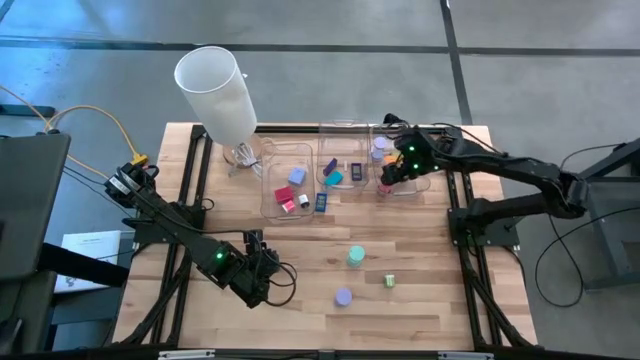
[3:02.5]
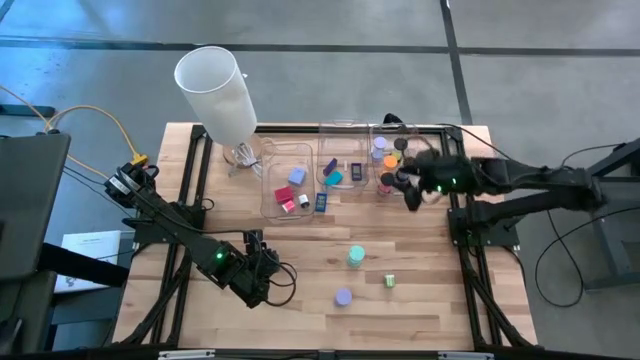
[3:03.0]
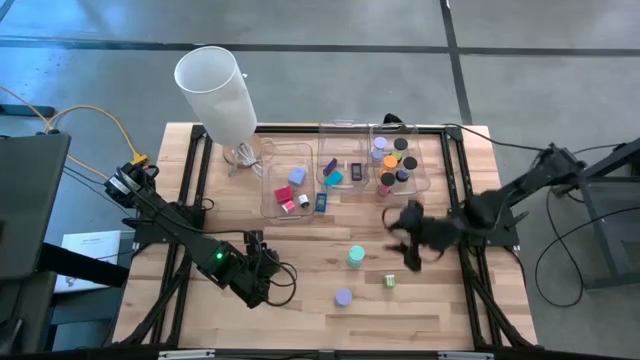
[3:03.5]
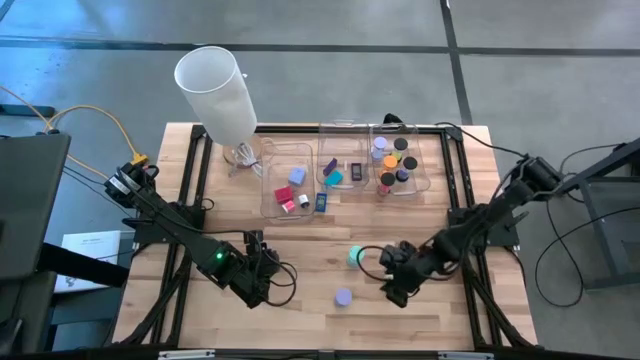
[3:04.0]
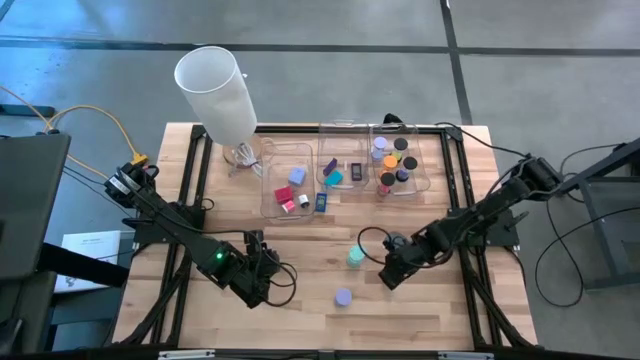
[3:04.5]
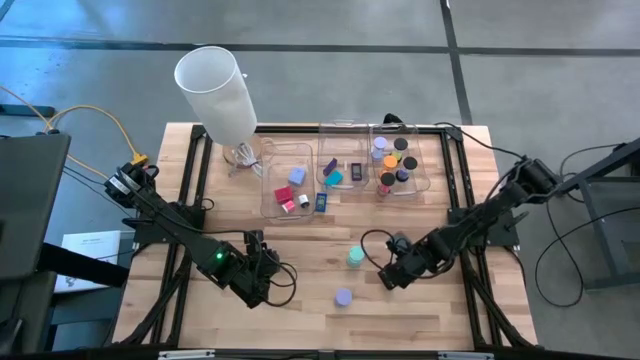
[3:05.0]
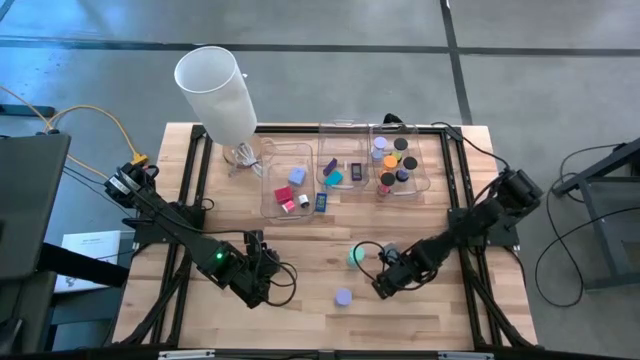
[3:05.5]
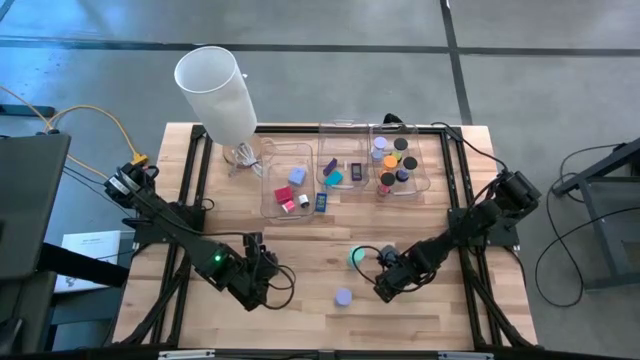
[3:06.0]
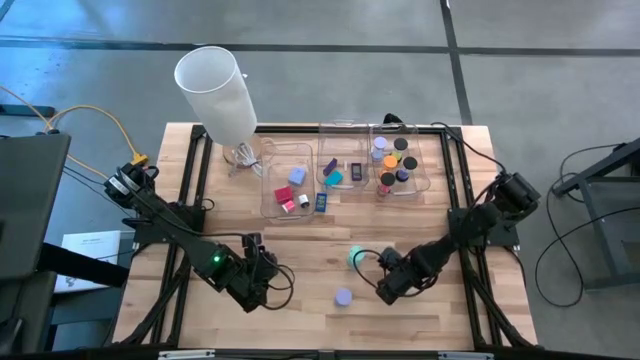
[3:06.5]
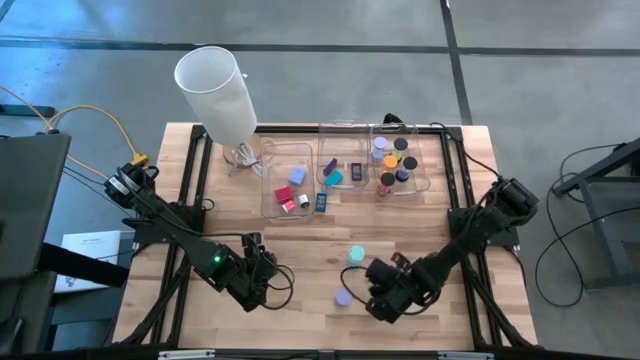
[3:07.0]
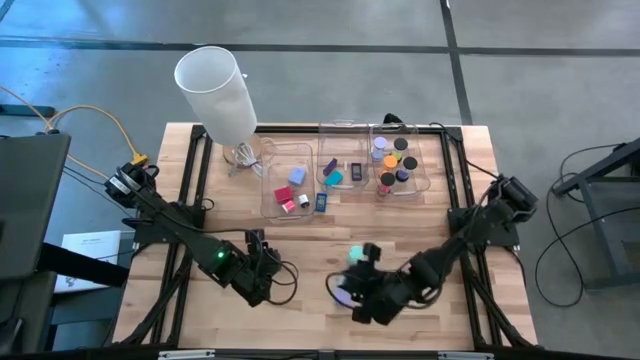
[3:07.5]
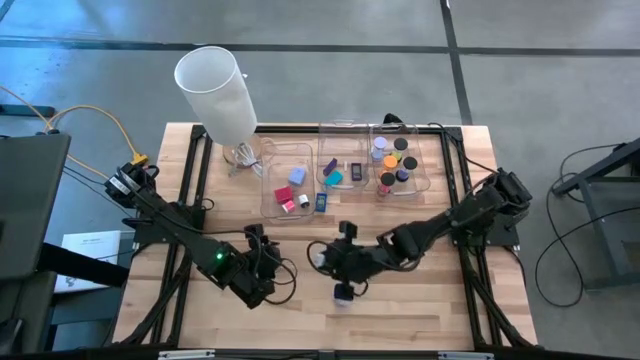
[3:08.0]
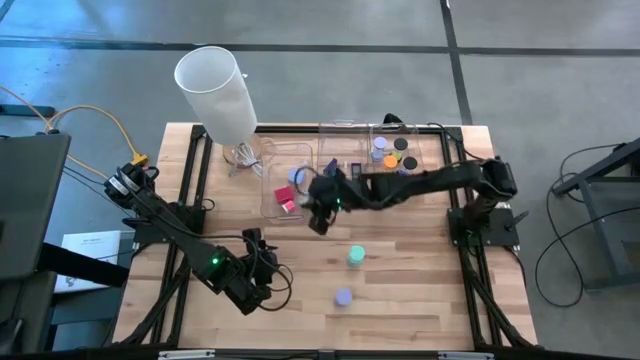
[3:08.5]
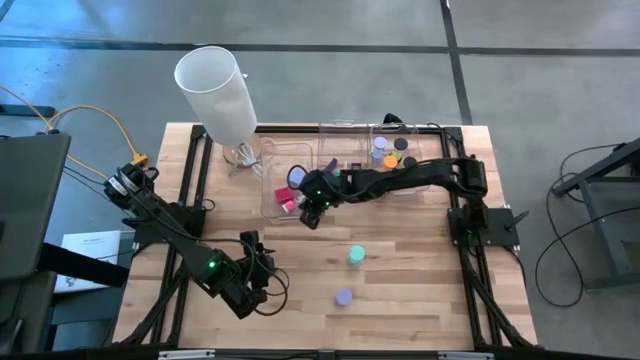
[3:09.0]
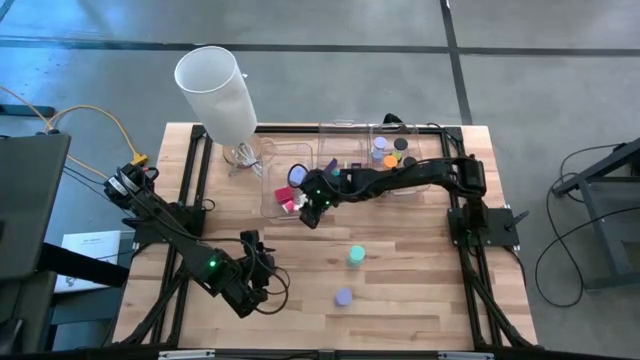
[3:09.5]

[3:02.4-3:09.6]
Task: Pick & Place Office items
Put the light green charger adapter into the left transparent bin

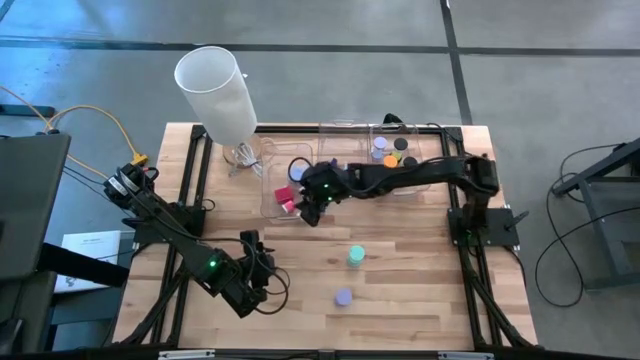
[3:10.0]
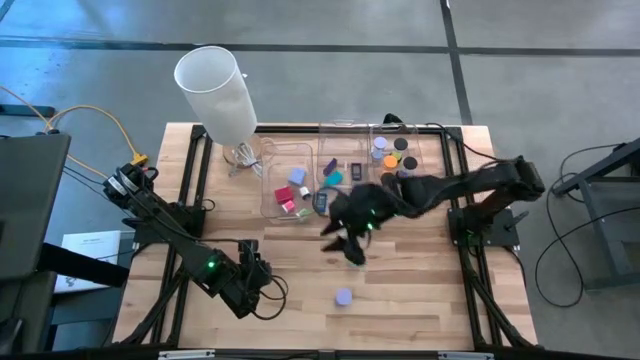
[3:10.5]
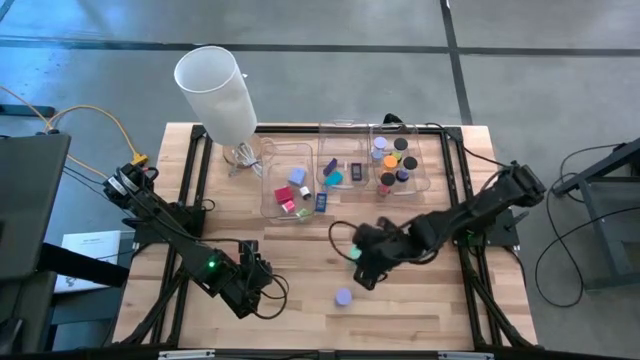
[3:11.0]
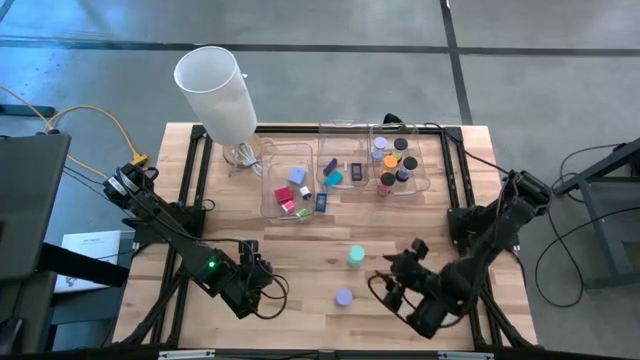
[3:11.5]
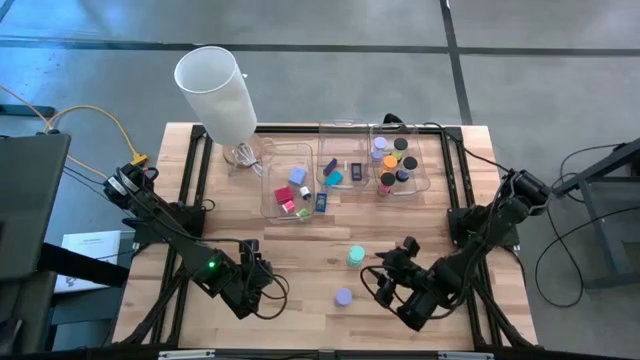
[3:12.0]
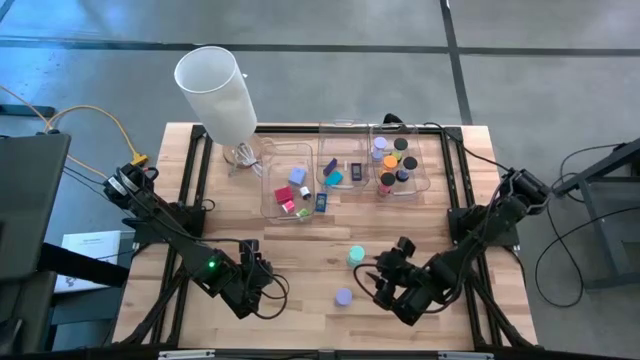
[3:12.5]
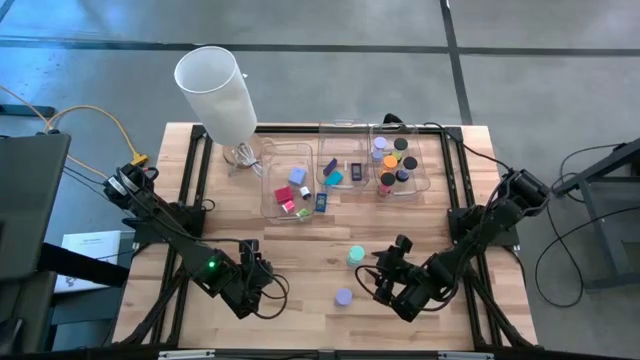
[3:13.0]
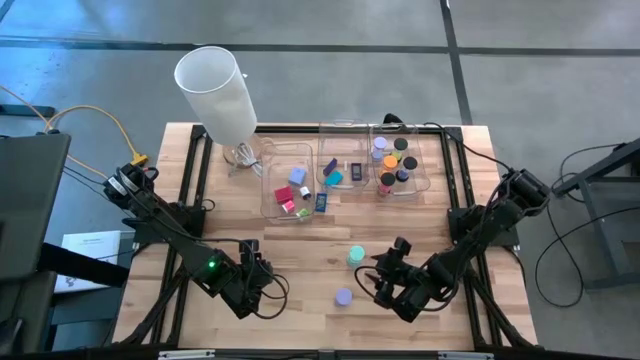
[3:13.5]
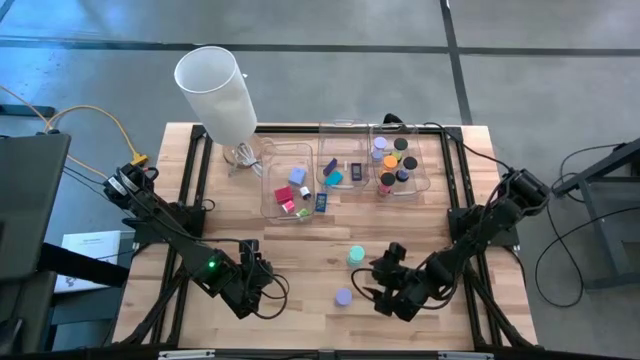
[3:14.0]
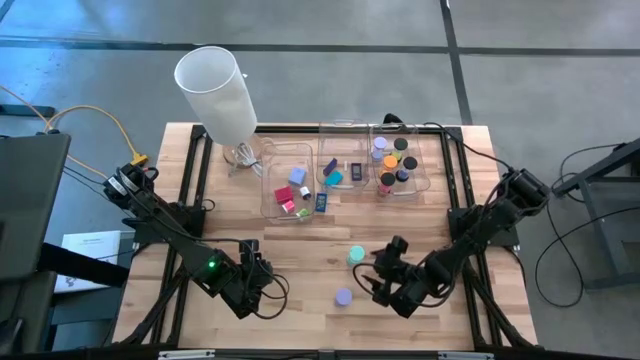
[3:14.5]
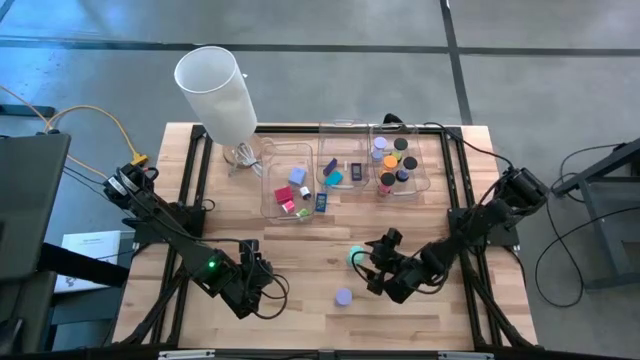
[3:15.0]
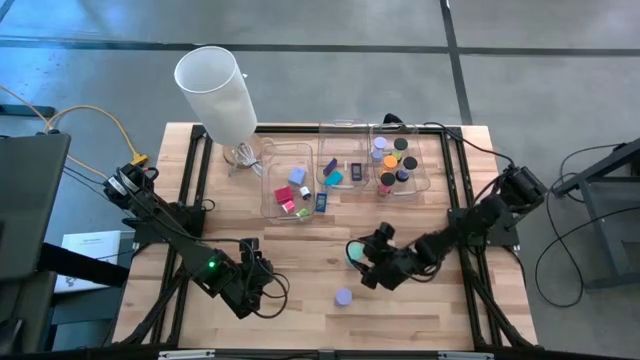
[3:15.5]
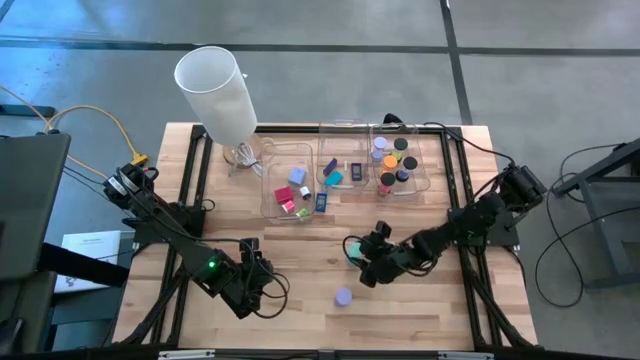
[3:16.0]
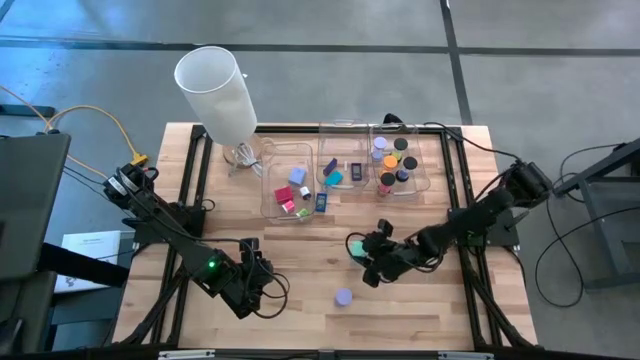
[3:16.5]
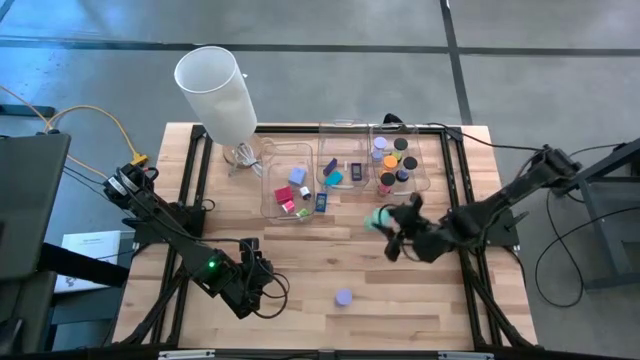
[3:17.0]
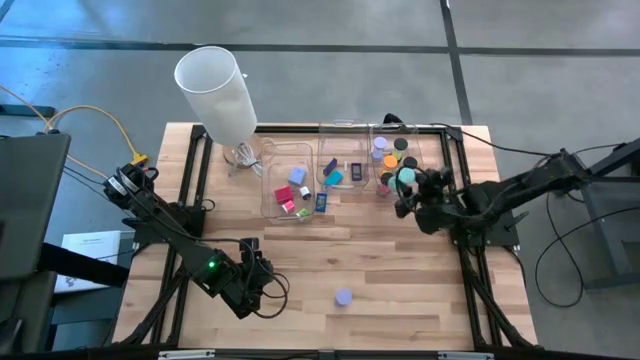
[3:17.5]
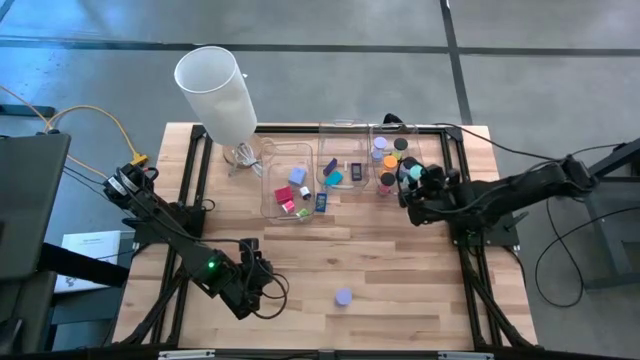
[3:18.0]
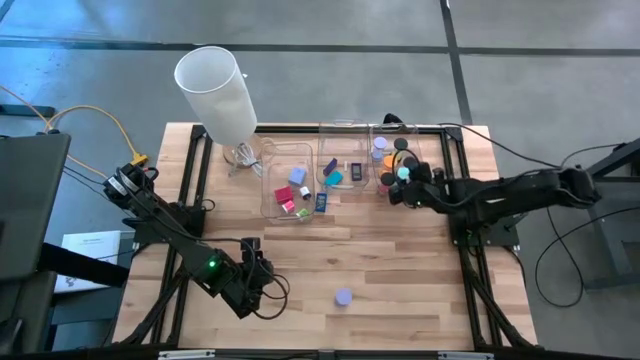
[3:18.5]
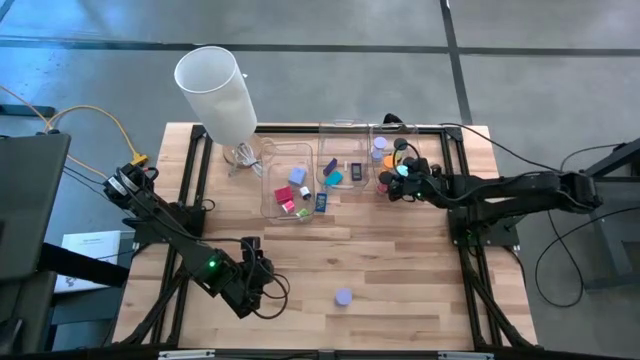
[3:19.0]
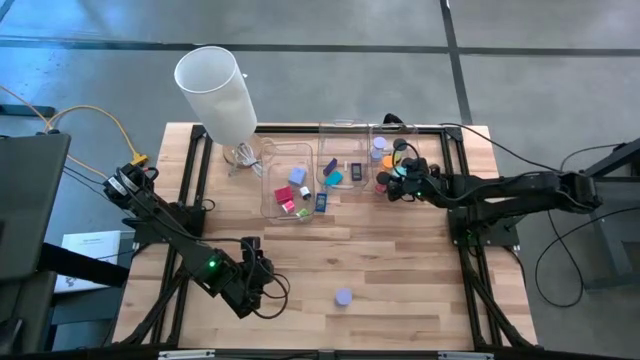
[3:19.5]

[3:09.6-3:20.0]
Put the light blue hourglass into the right transparent bin

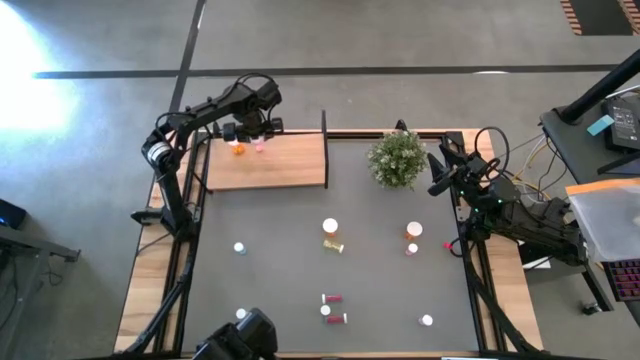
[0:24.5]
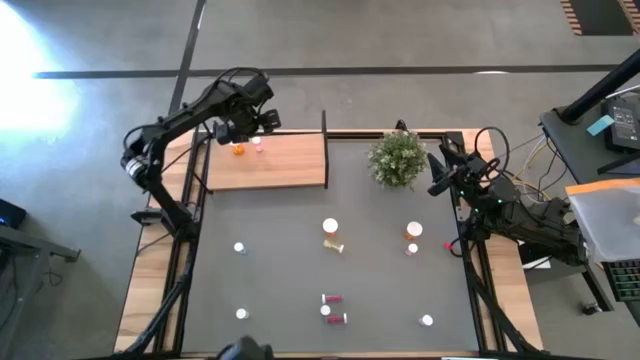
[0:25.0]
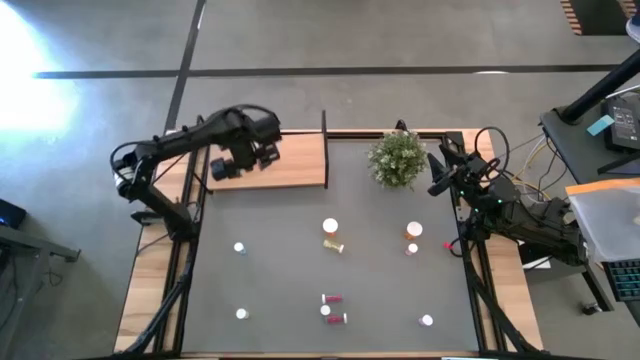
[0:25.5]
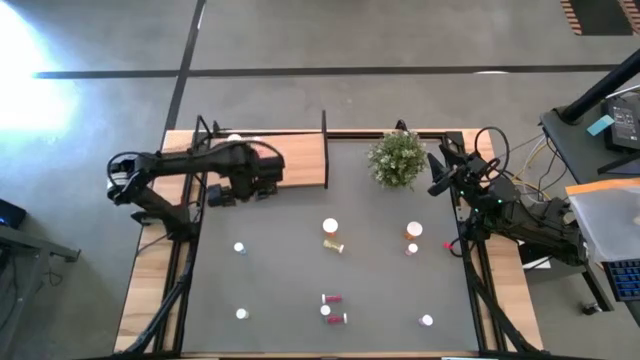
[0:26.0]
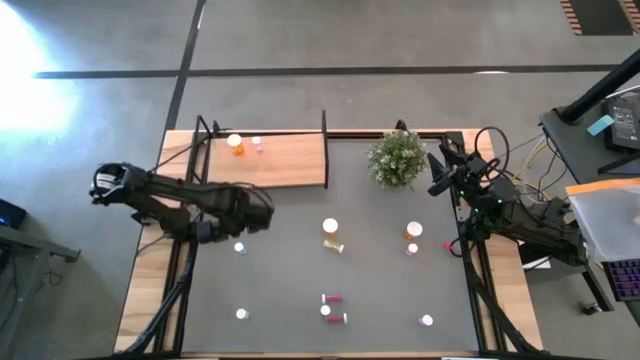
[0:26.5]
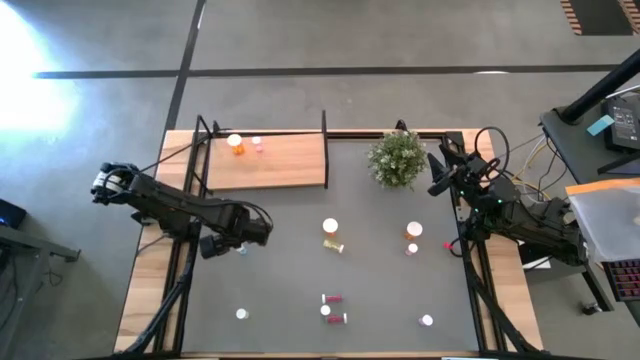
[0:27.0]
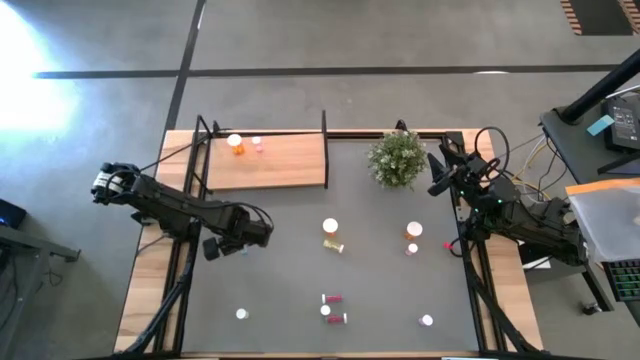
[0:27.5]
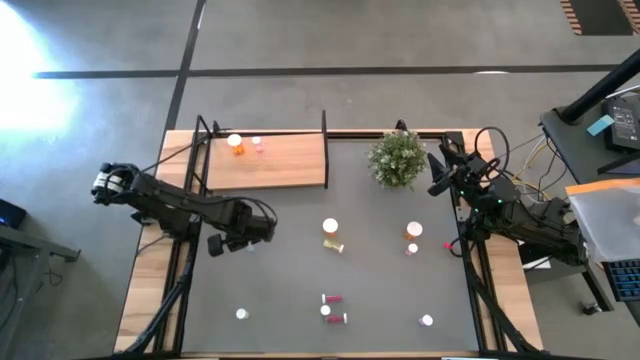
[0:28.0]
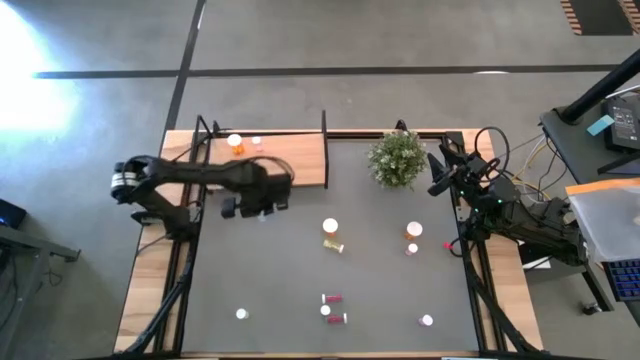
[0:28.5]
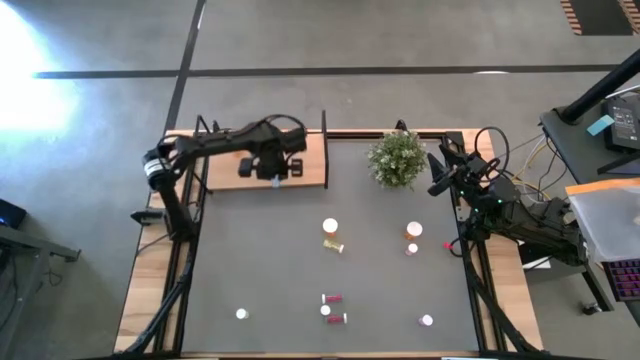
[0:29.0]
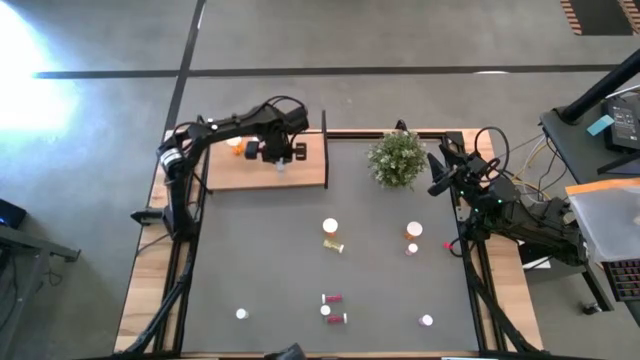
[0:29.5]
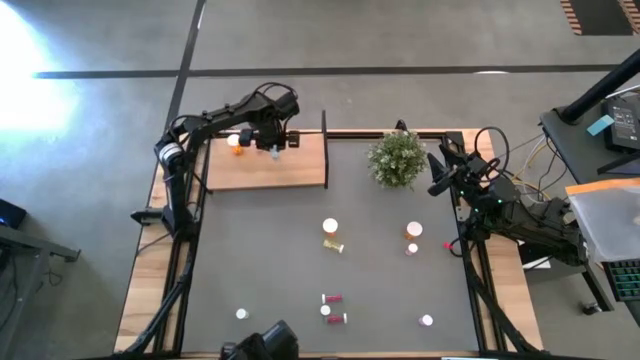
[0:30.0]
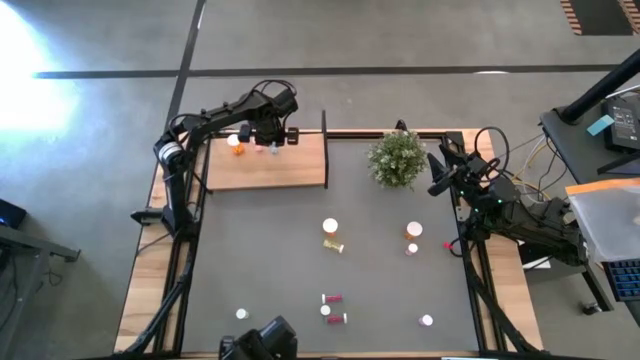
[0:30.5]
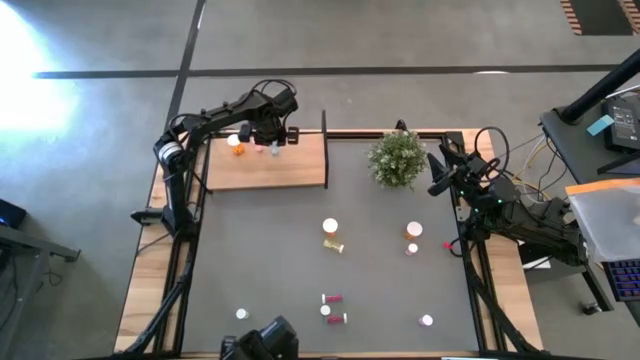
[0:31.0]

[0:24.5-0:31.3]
Task: Pick and place medicine bottles onto shelf by color
Put the top small blue pill bottle on the shelf
